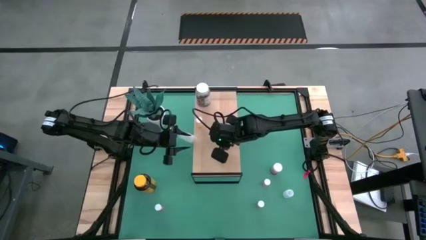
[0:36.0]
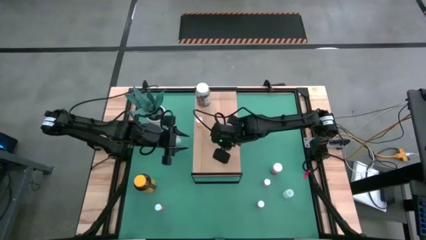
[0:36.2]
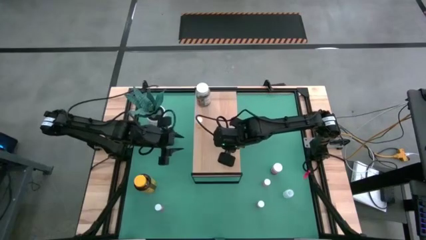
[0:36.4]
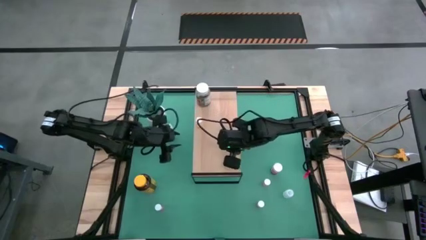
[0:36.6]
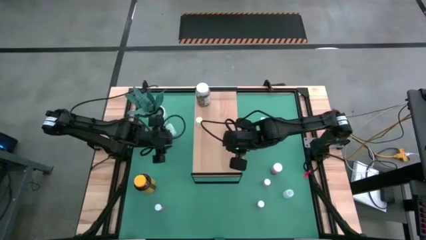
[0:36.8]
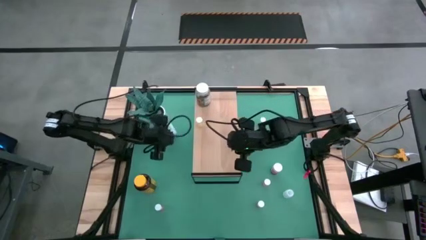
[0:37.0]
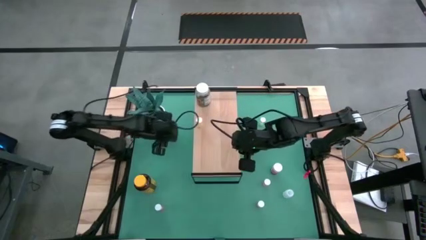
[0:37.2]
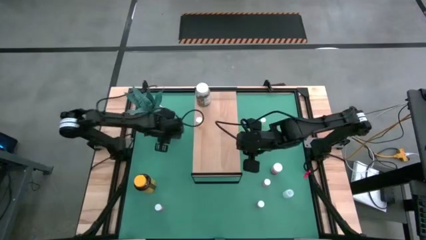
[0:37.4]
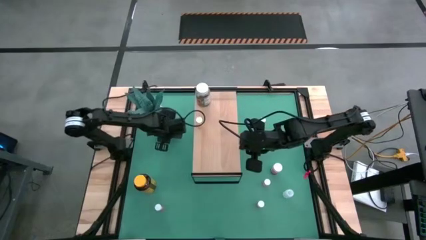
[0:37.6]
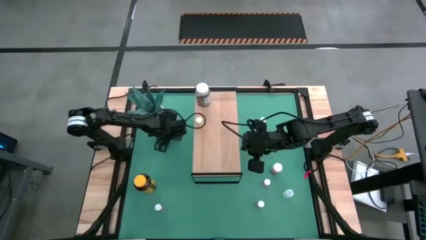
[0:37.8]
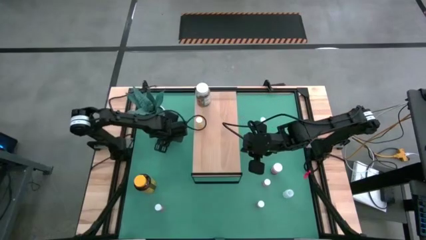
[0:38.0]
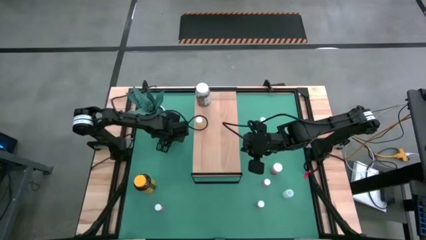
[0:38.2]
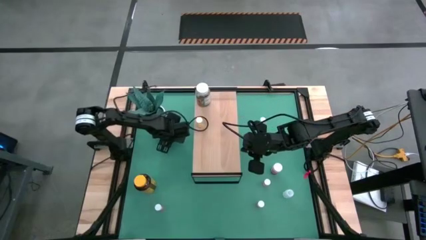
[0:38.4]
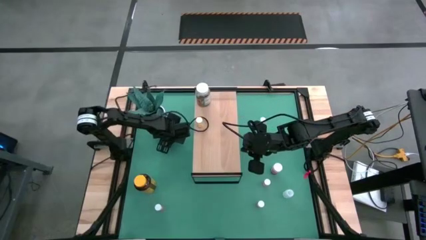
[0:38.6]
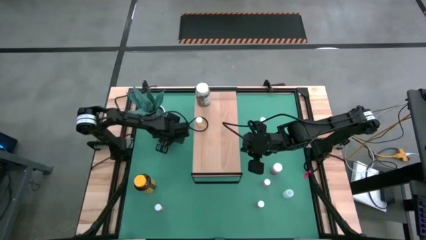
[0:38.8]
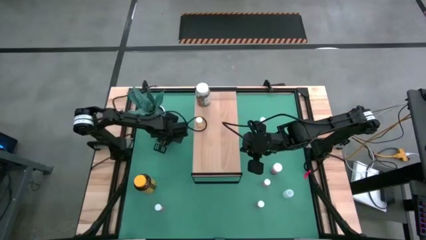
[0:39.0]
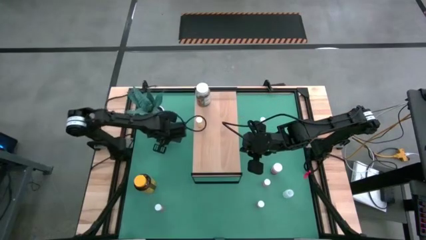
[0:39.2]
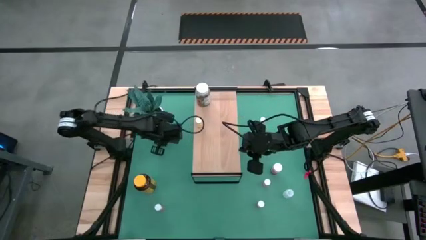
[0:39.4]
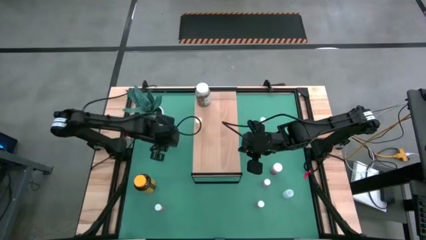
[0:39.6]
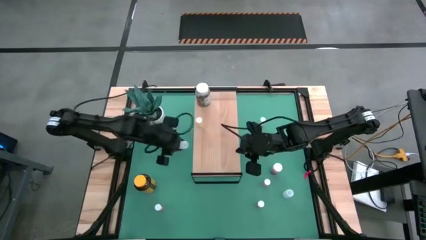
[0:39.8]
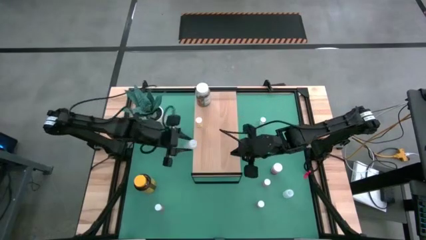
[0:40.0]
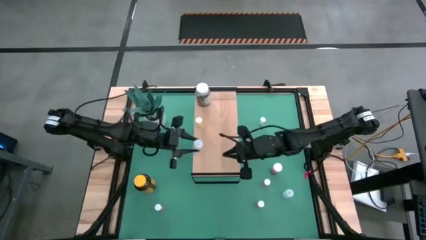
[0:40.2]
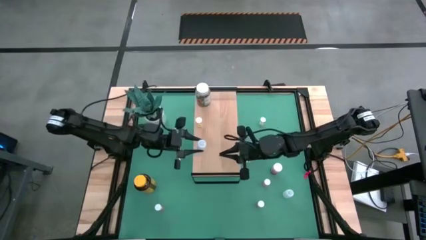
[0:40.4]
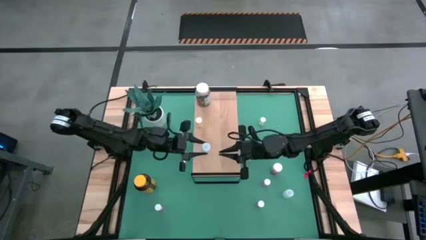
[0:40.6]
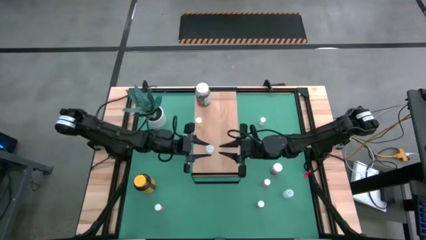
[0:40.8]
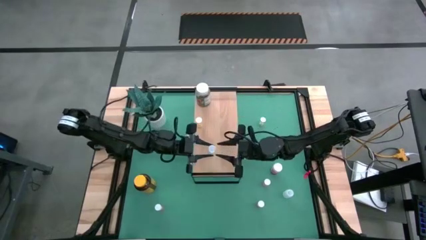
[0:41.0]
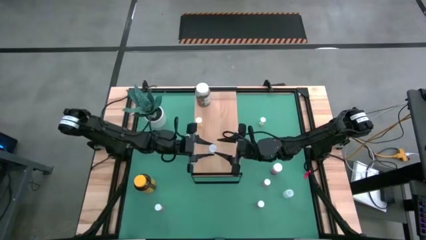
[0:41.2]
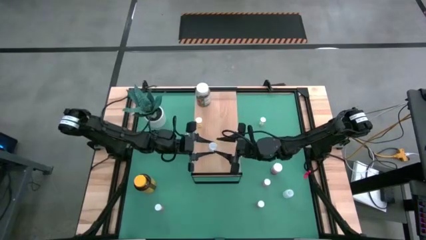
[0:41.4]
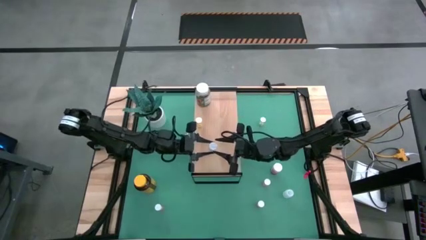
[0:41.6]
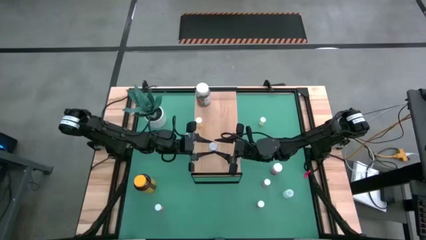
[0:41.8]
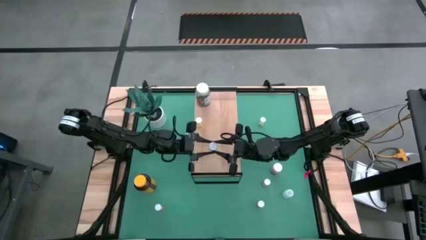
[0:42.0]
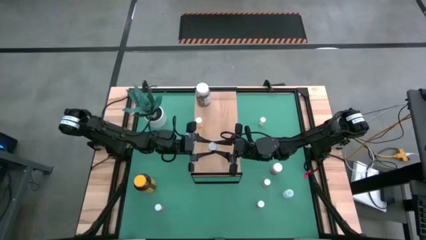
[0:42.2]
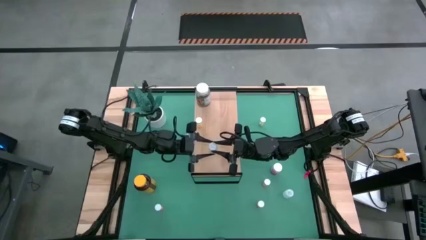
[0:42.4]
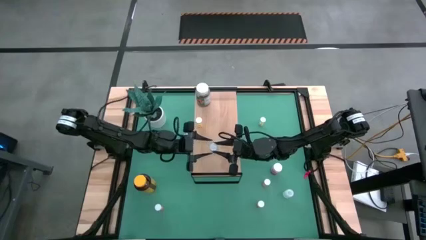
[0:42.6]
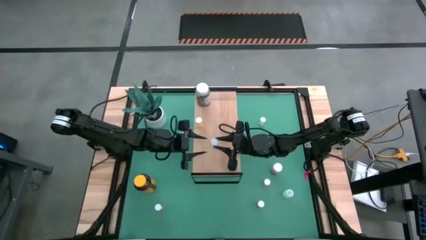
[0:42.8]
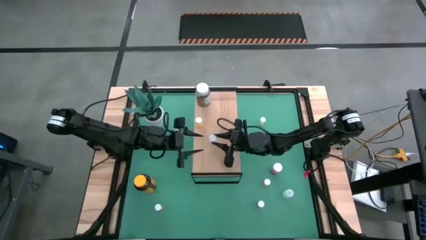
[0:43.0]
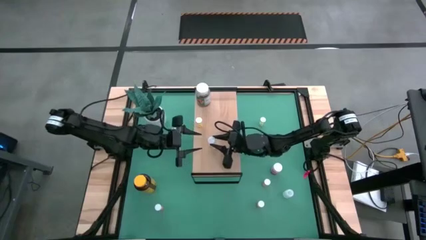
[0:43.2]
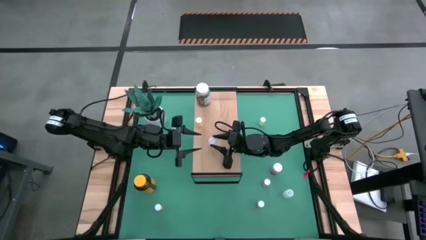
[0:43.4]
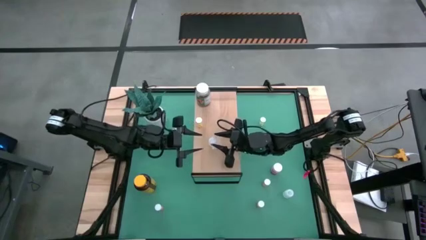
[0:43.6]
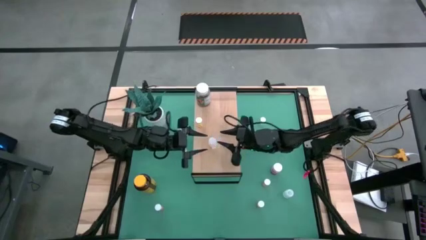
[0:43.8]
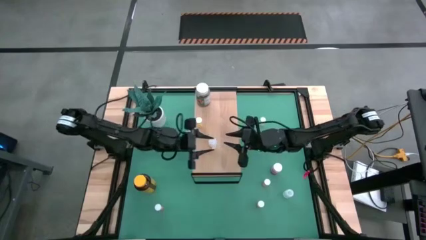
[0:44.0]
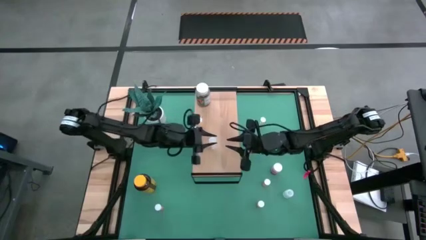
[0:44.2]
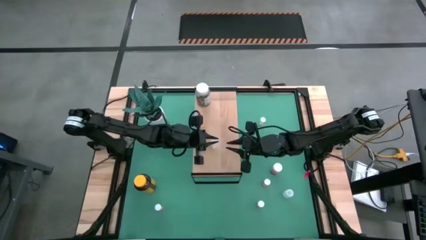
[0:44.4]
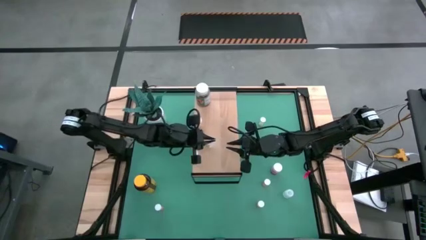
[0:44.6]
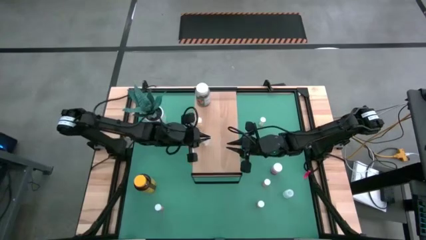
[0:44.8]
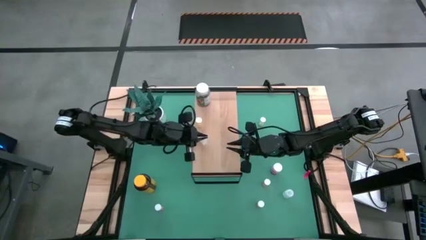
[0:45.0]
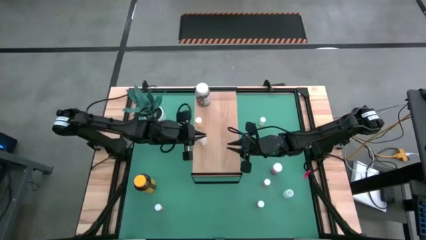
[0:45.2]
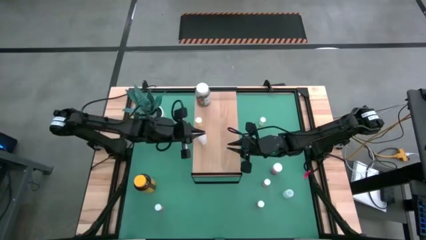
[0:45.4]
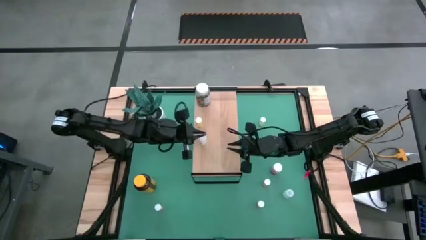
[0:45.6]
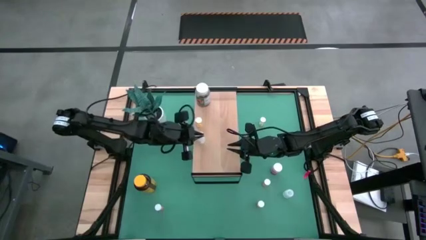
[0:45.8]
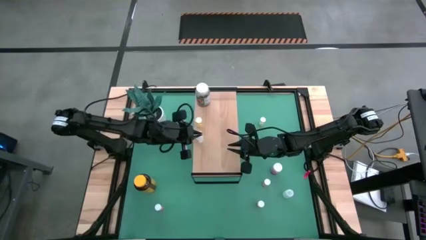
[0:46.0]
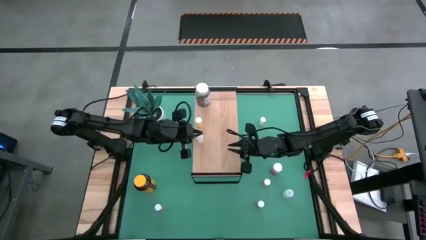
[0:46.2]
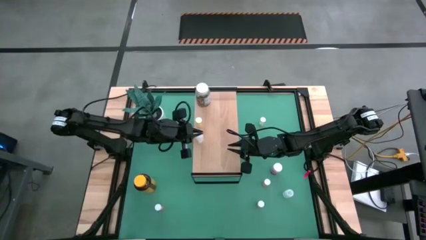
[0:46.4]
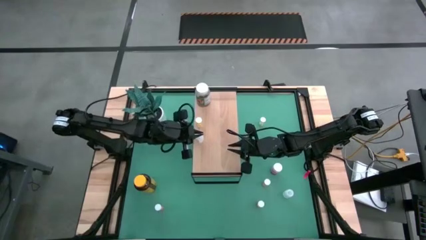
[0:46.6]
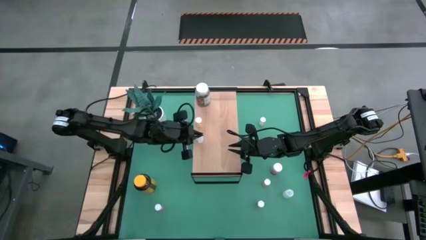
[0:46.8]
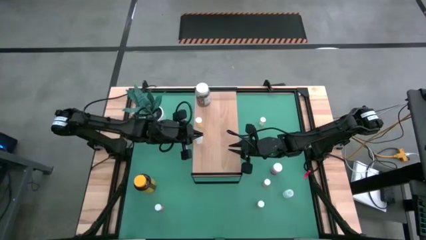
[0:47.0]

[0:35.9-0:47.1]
Task: Pick and place medicine bottles onto shelf by color
Put the white pill bottle on the shelf

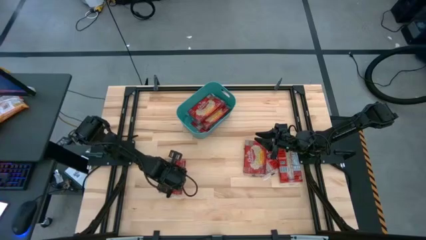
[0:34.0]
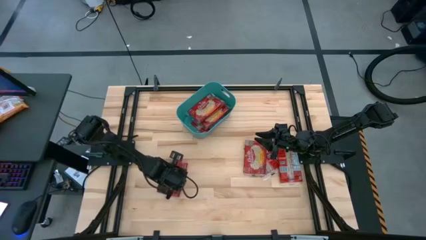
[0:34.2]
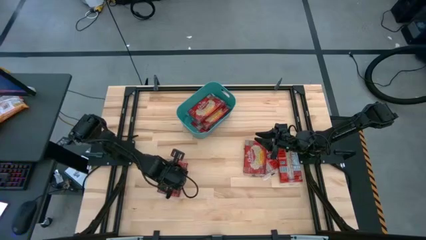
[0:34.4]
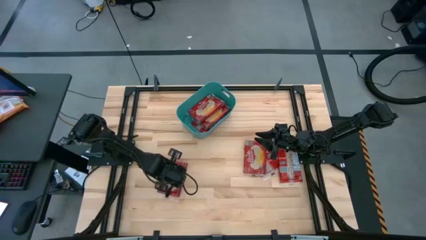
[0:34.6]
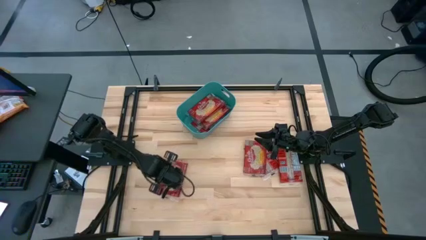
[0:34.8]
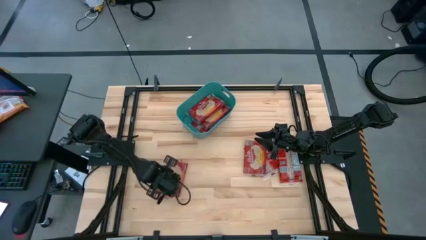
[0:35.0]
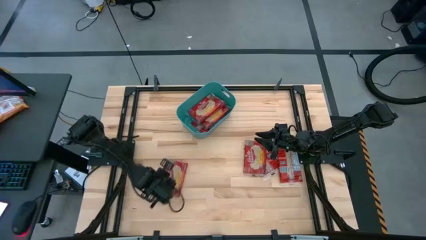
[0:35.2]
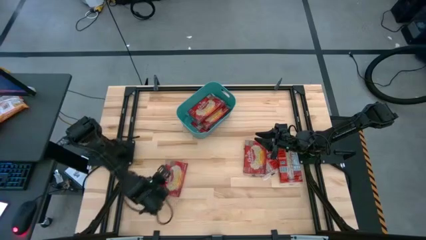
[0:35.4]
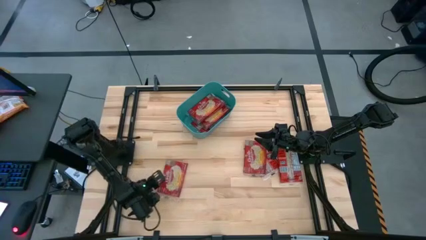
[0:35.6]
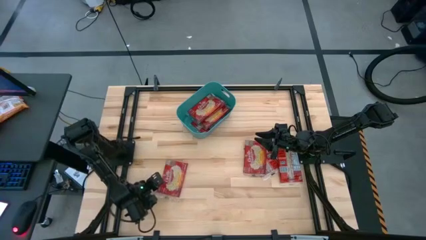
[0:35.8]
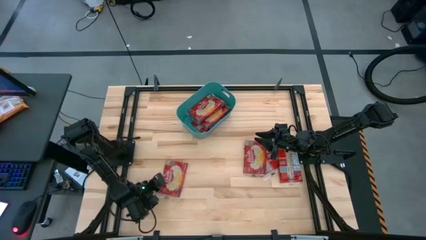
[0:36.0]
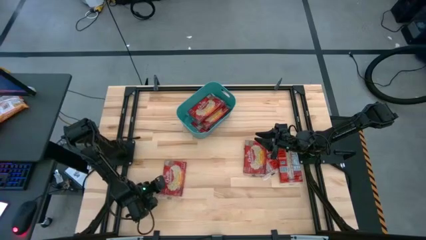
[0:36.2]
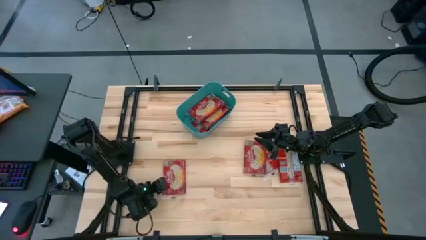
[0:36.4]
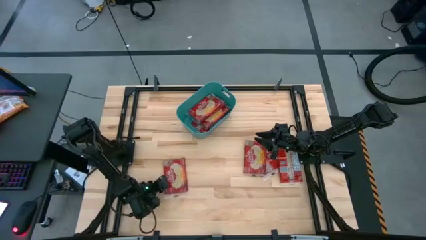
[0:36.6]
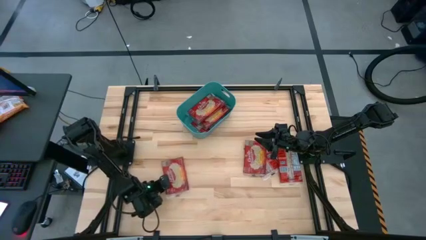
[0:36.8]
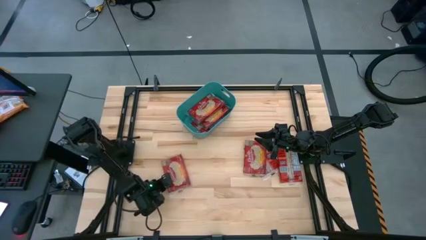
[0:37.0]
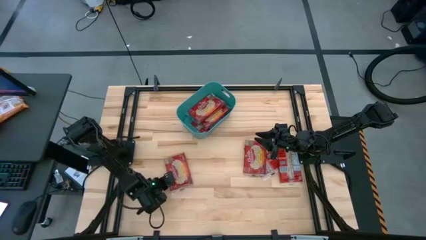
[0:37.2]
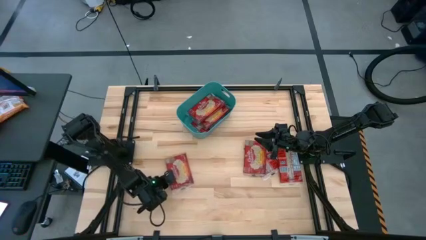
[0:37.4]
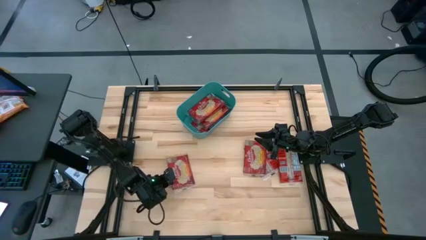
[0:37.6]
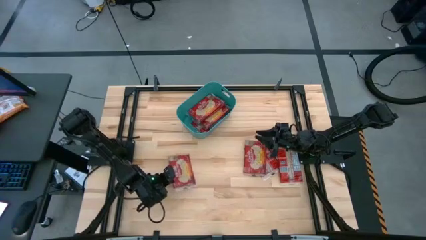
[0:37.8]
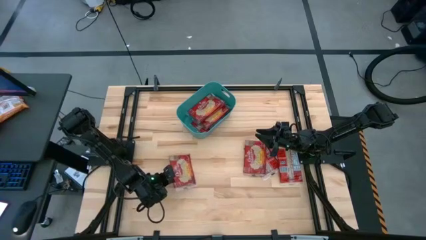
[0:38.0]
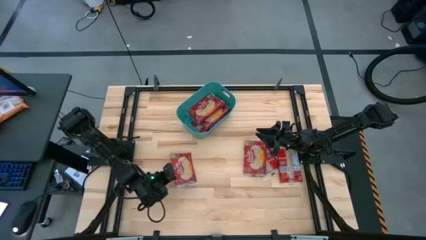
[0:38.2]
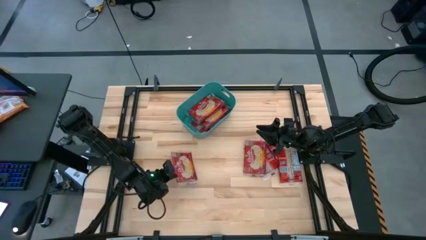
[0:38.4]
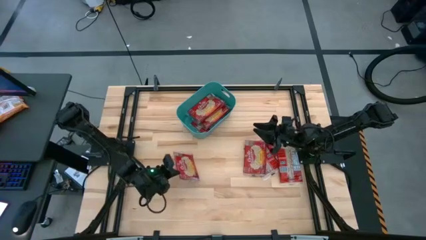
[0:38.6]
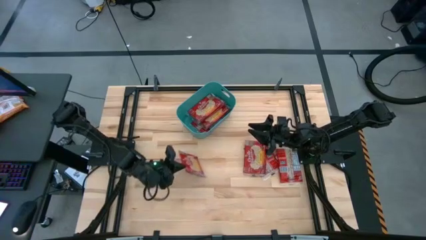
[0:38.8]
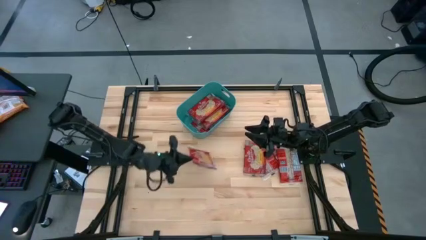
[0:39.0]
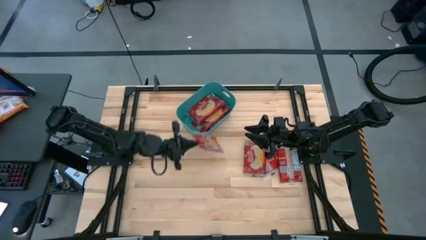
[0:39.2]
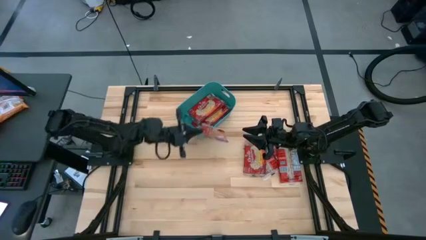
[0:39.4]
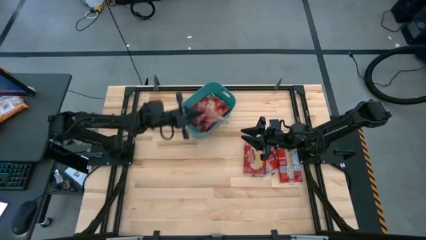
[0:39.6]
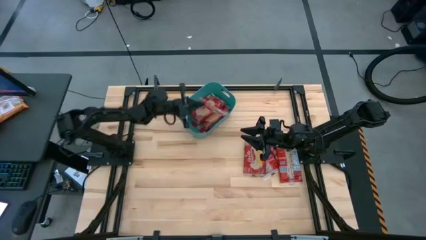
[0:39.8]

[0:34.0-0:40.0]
Task: Sort popcorn bags into baskets
Put the red popcorn bag into the green container
